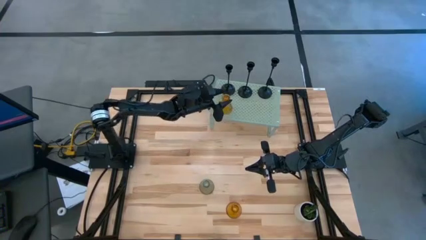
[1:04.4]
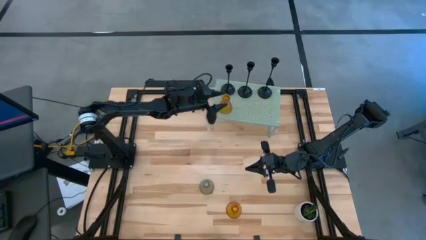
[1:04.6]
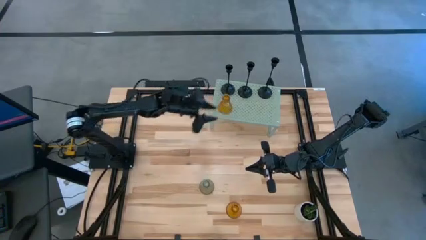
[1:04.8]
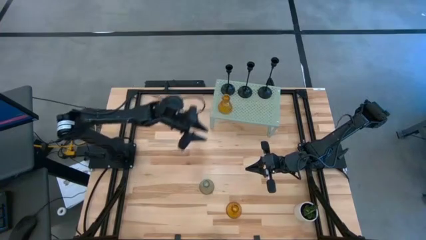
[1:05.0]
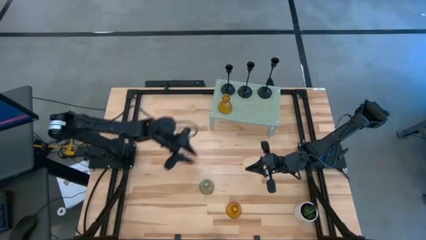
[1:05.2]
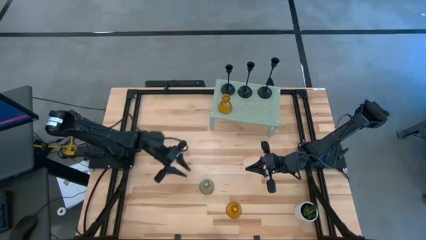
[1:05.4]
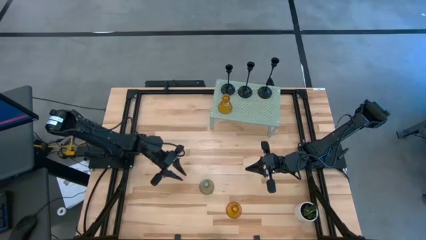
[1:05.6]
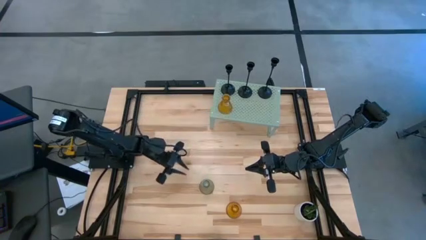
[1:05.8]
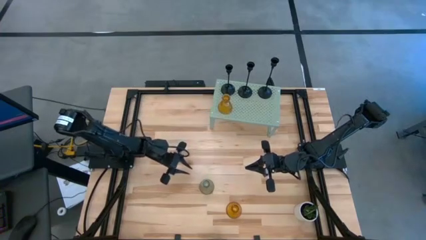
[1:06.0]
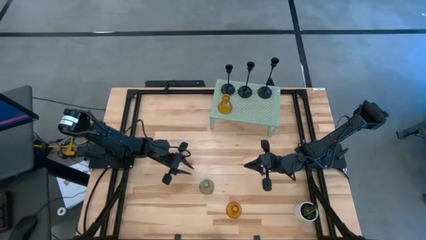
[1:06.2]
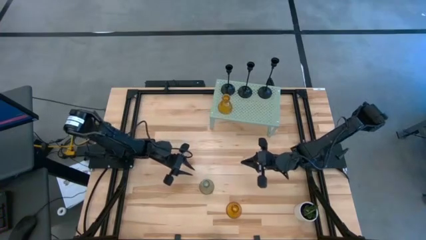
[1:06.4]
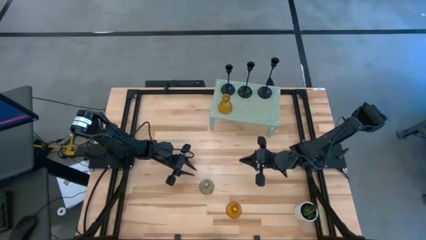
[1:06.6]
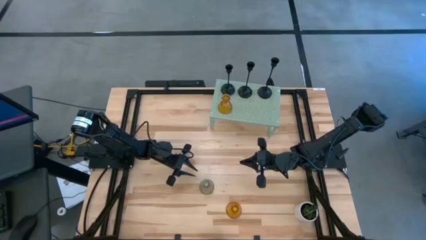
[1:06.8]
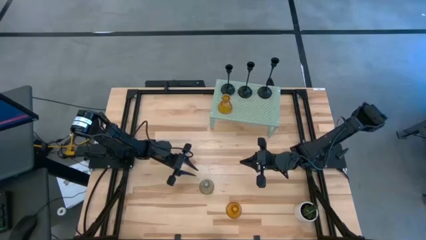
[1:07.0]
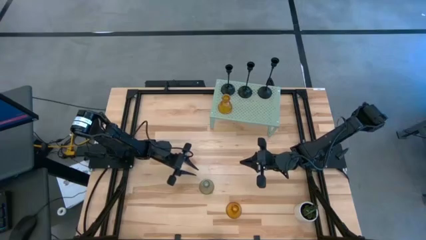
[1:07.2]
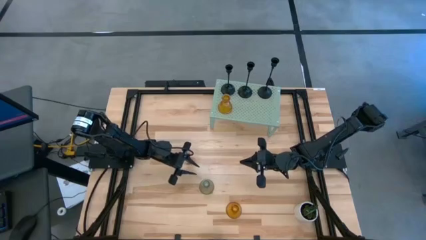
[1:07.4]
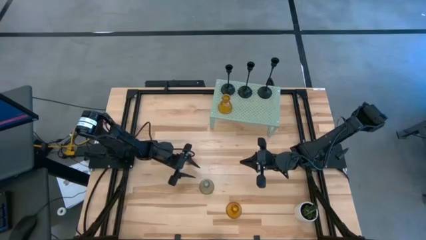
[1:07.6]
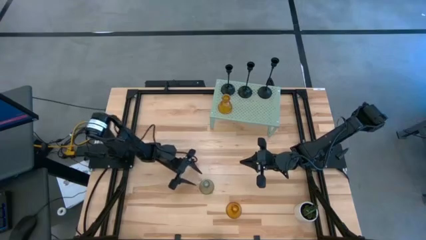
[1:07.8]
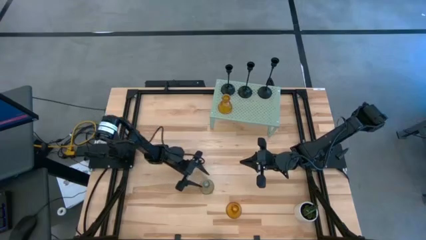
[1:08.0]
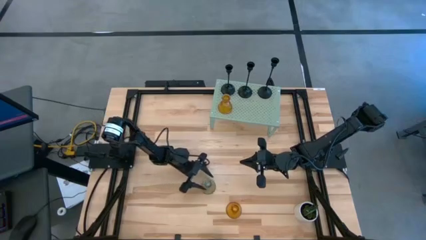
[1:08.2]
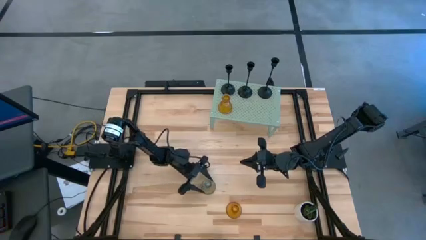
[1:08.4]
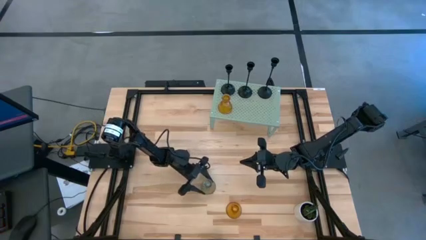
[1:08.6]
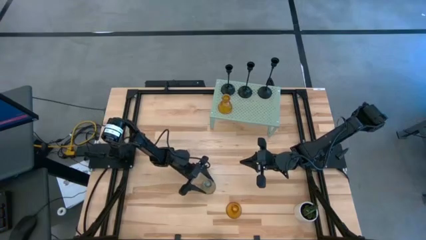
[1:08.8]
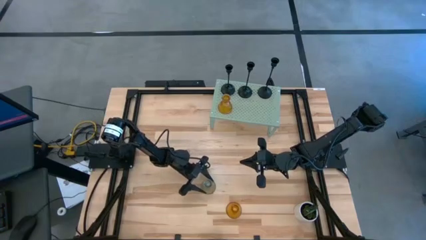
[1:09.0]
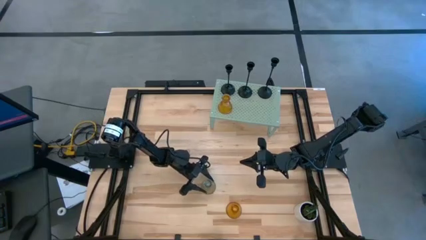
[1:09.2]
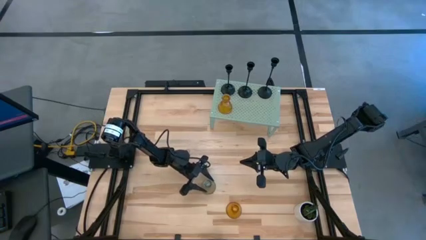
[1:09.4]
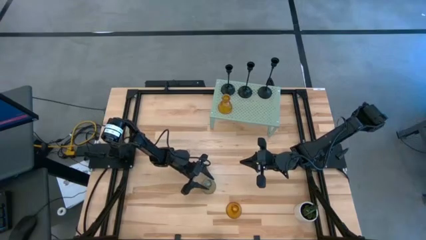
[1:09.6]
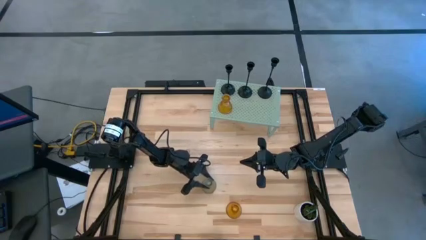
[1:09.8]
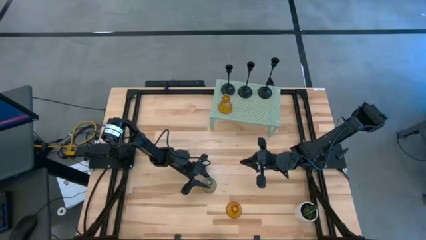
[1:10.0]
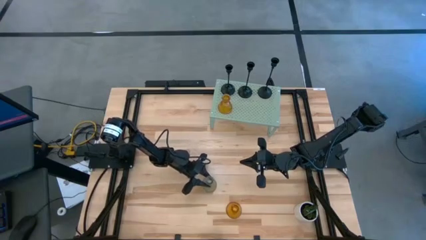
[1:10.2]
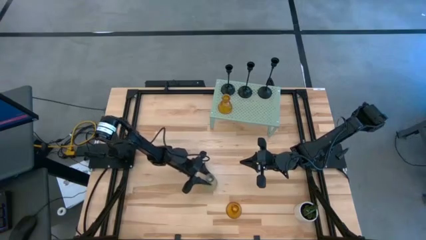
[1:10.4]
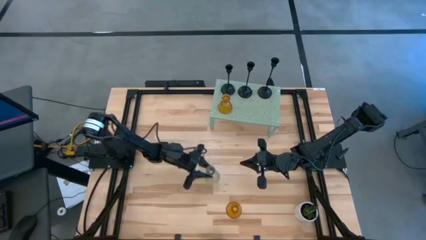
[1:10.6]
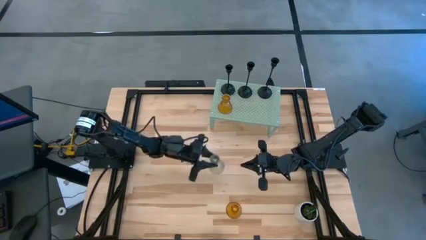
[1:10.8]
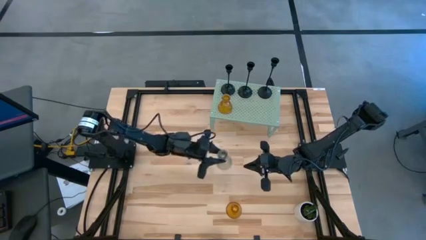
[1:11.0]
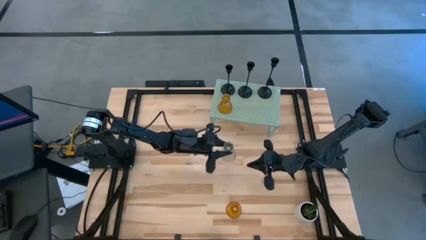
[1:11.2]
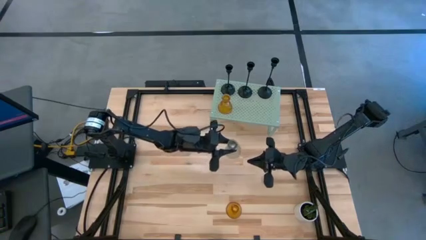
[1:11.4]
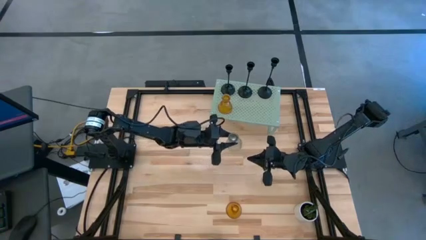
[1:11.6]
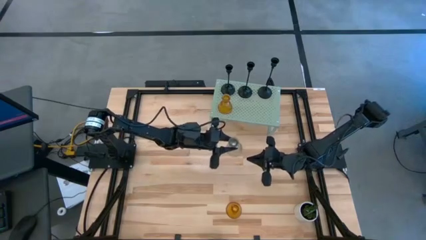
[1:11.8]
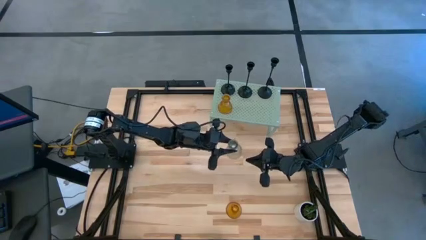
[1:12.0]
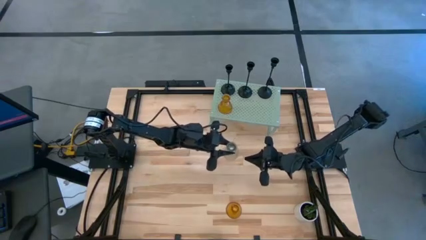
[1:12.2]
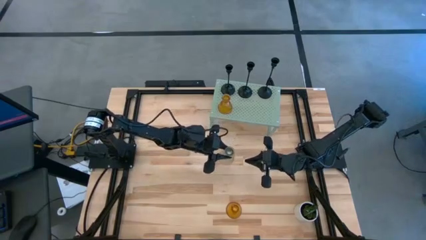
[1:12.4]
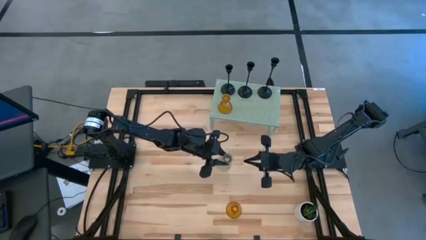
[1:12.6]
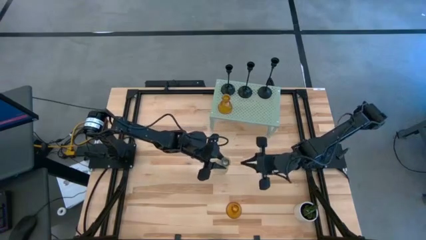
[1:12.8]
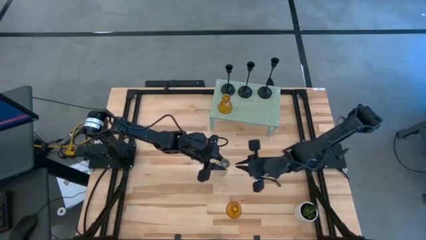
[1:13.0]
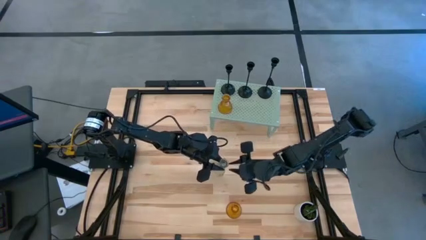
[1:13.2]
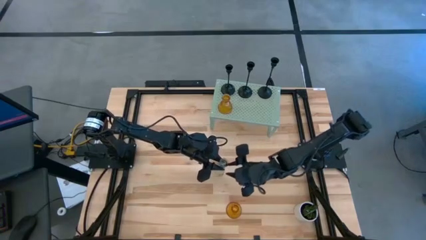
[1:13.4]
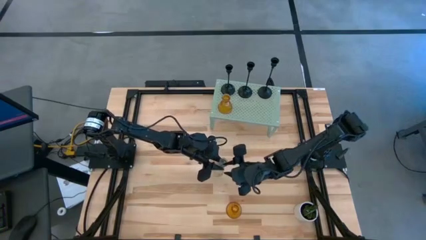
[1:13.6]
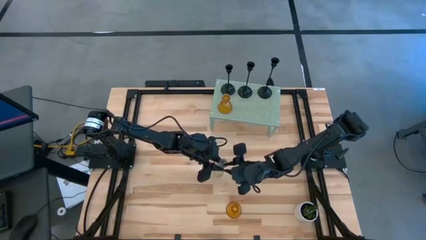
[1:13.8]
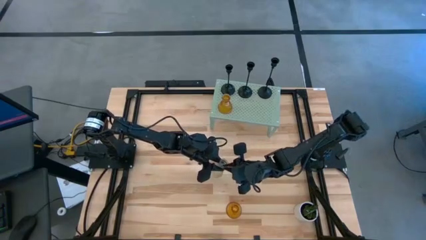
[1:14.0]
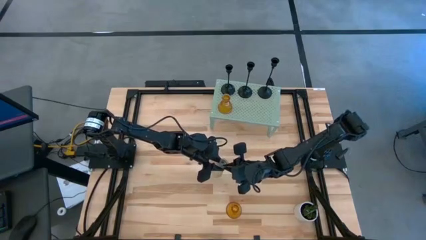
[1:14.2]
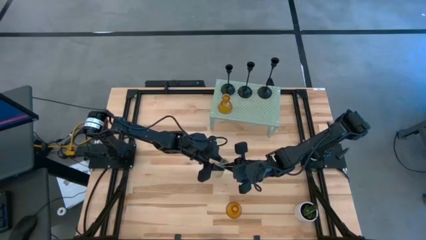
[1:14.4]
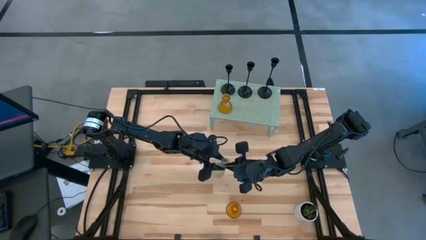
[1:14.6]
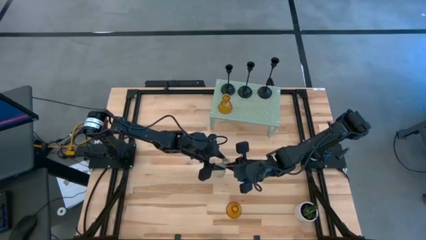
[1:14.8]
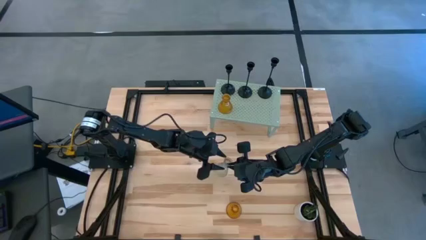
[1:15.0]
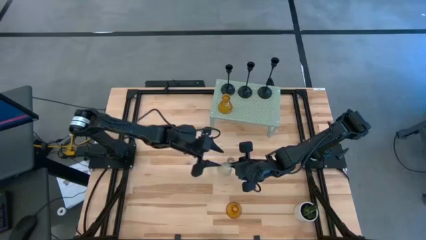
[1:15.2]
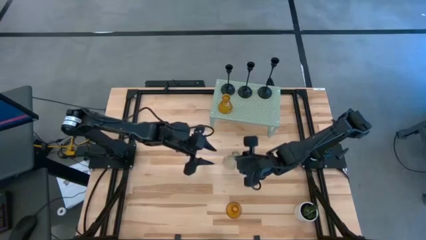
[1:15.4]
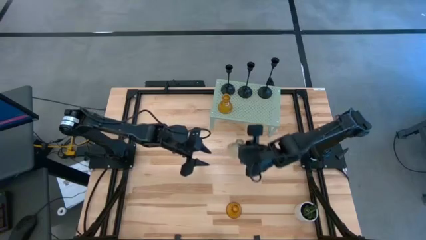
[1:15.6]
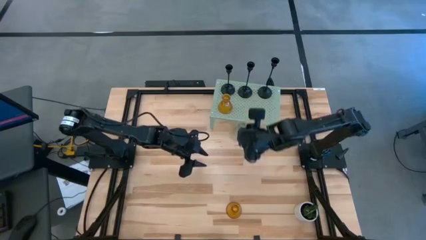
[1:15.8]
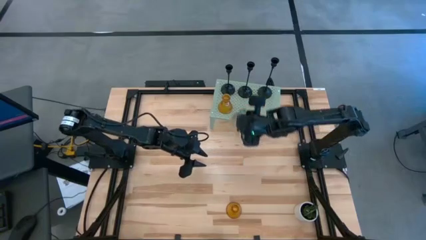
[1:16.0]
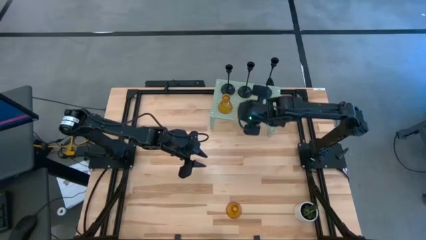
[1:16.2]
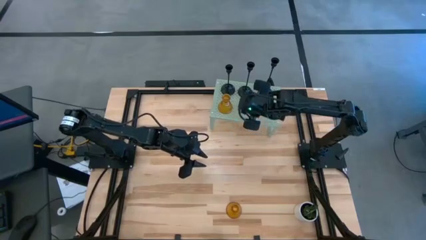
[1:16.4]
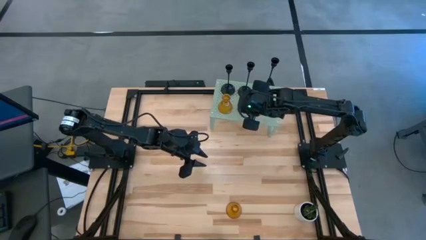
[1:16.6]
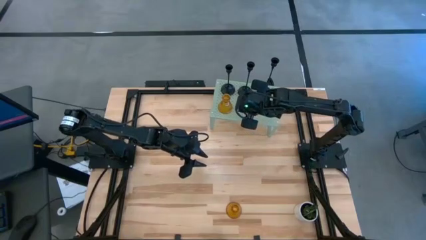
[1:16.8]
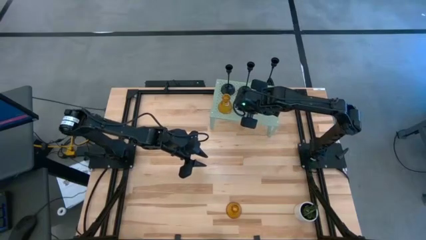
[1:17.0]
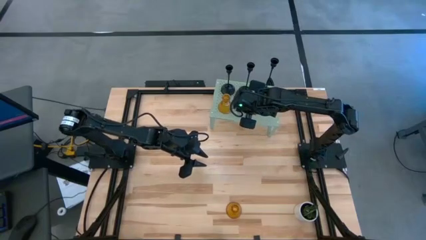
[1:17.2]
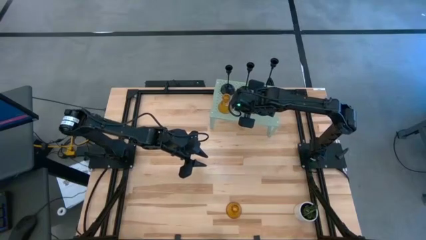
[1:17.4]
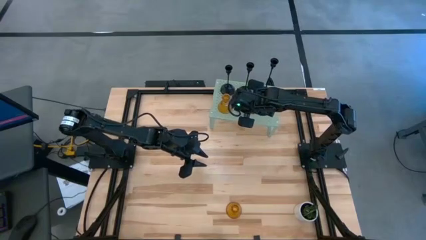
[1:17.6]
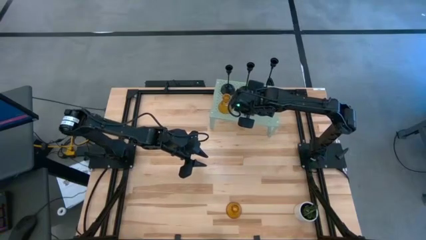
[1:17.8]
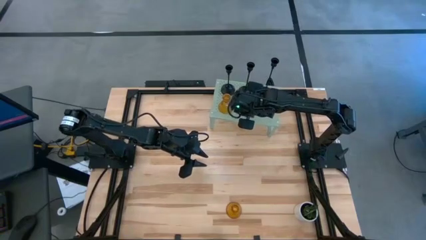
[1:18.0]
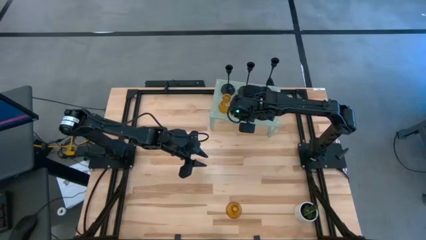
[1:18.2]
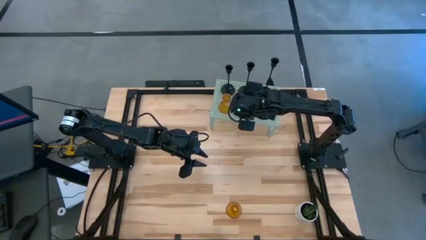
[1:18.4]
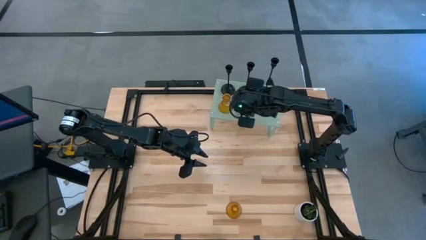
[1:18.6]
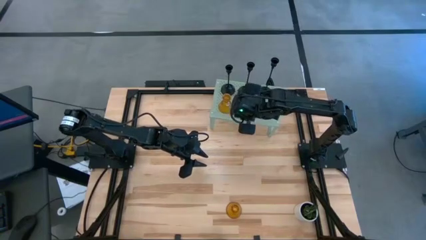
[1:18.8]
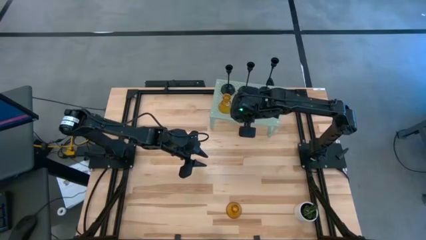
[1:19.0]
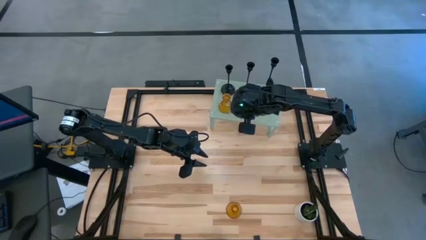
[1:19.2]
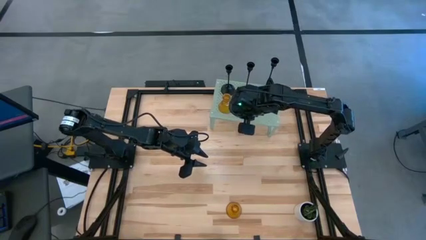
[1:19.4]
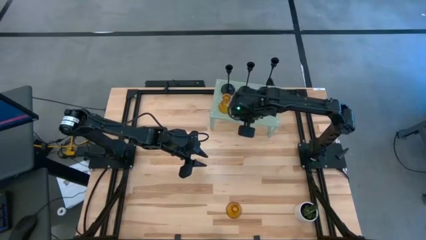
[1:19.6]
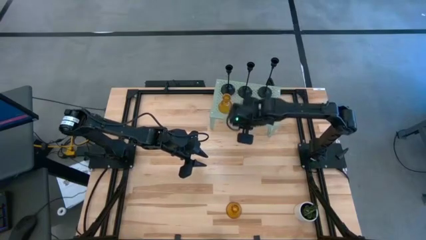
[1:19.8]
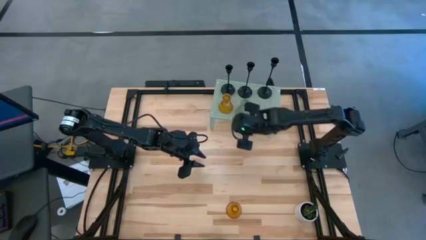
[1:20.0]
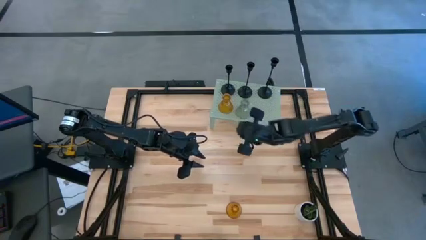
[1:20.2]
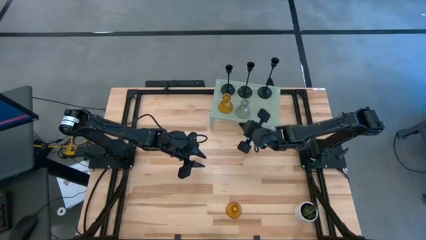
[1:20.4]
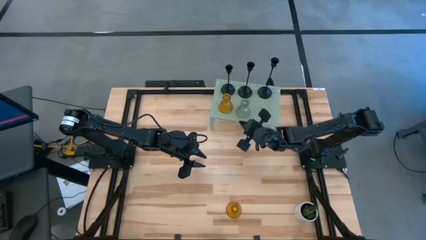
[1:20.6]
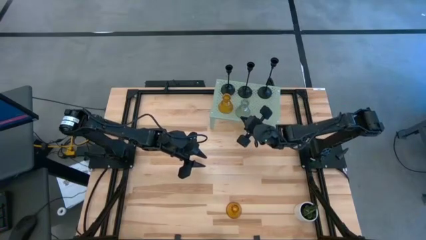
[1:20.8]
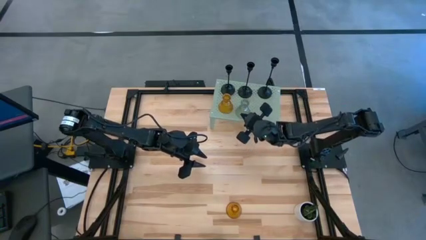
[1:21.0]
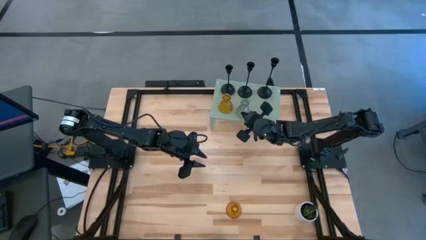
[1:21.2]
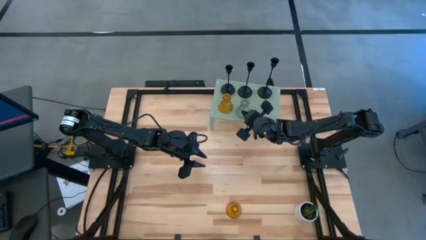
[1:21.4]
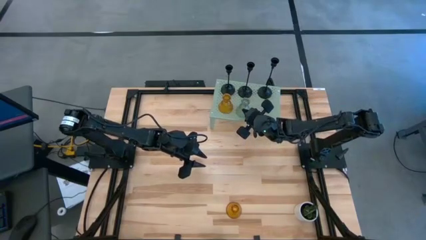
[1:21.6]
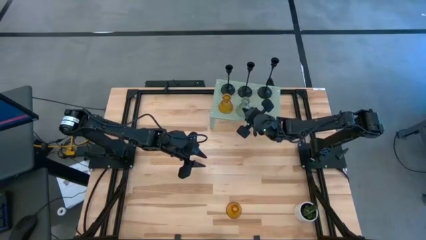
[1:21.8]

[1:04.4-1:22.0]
Task: Pick & Place candle stick holders
Put the green glass candle holder on the shelf
